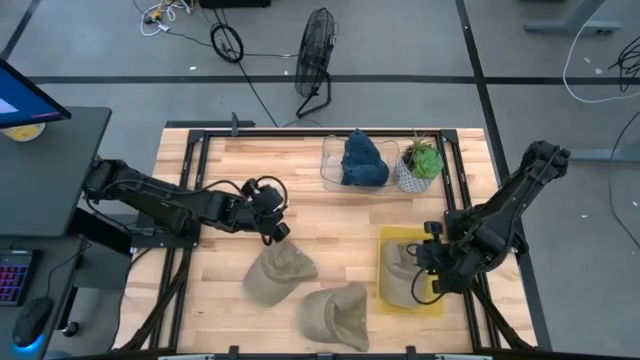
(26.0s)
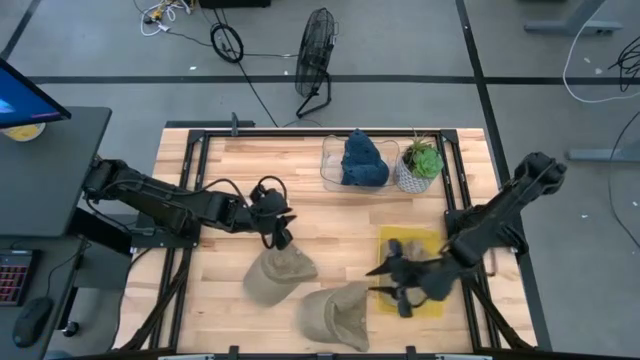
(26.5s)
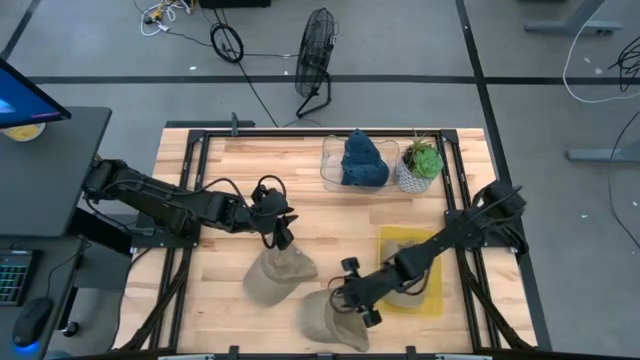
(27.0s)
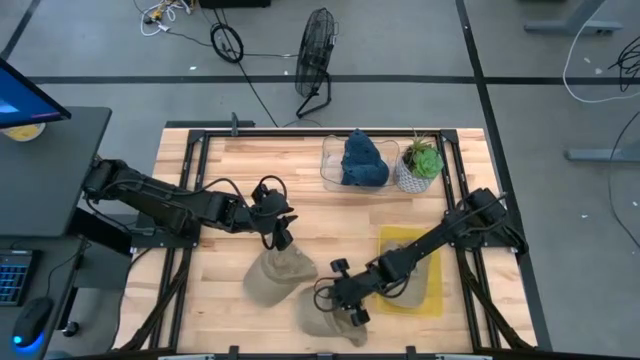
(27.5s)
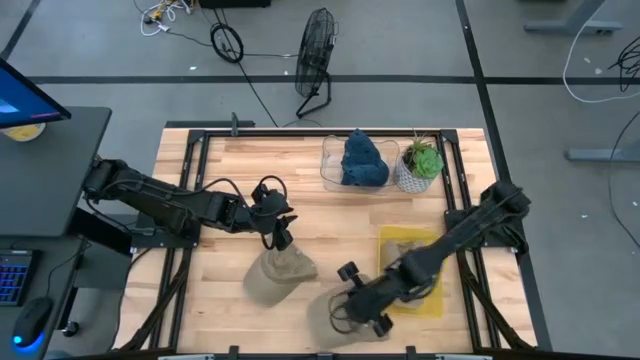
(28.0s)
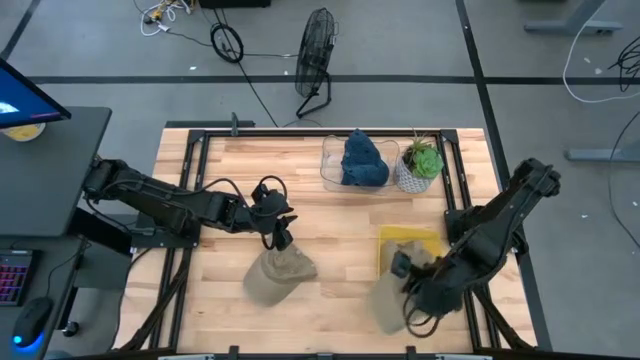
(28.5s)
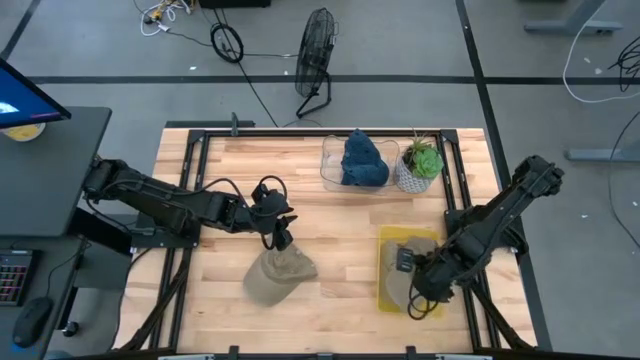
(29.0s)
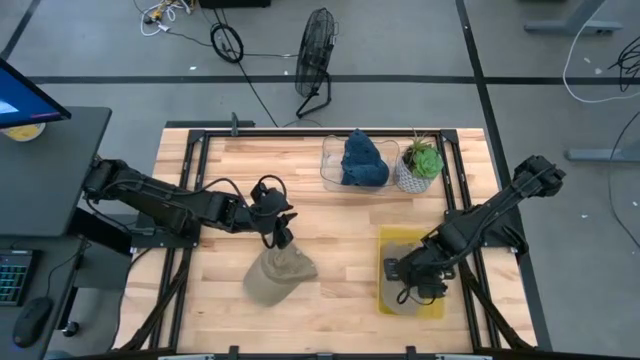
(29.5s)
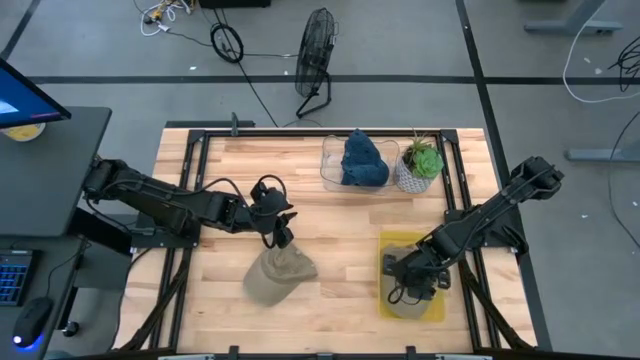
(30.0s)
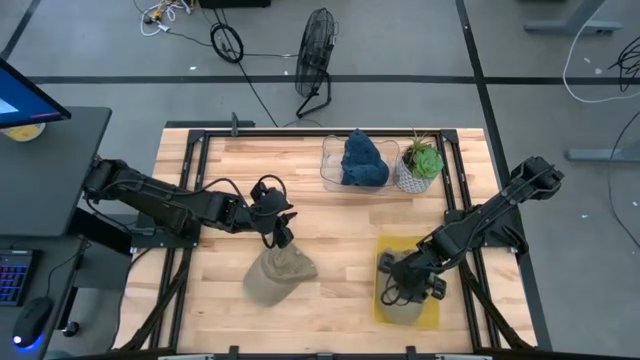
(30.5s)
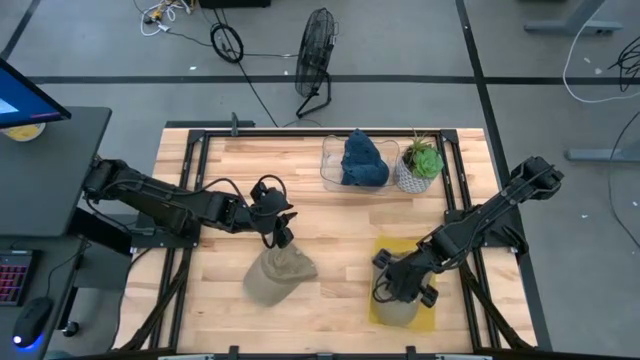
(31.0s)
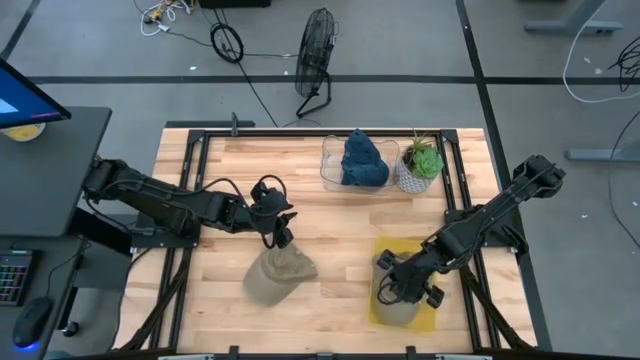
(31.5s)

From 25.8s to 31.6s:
Task: Pick & Place hat
Put the bottom brown cap into the yellow bin

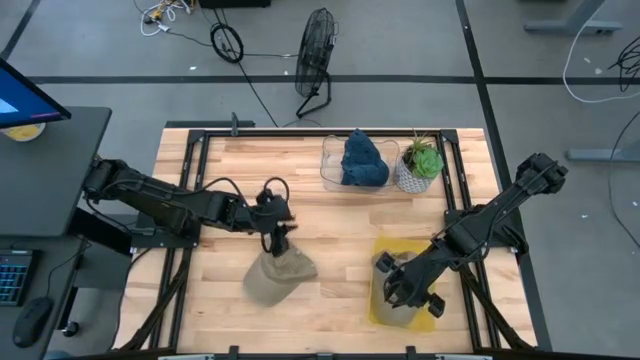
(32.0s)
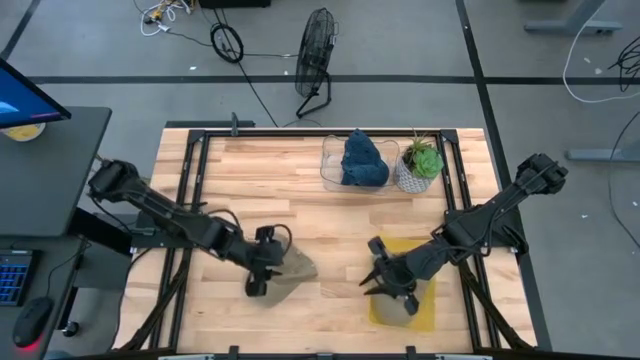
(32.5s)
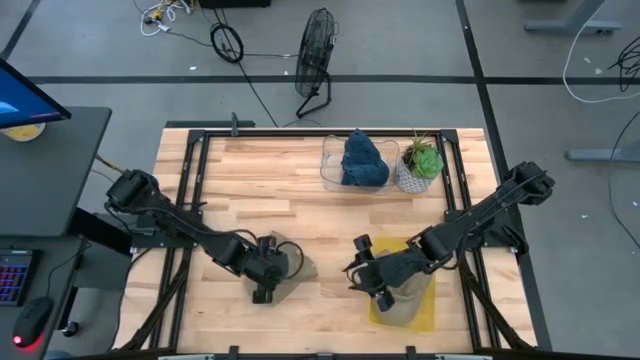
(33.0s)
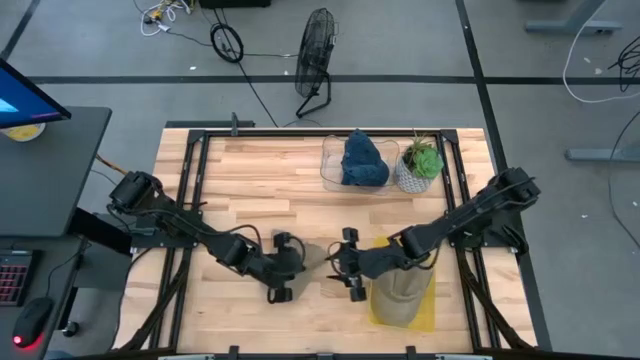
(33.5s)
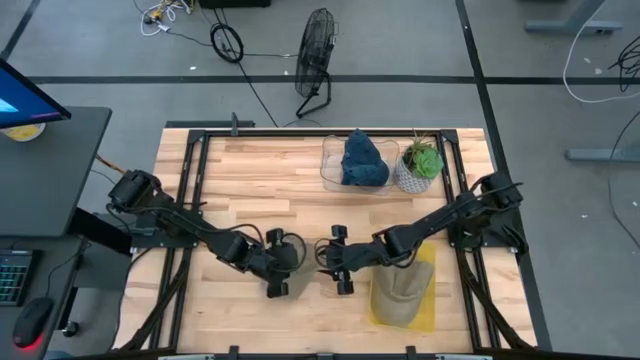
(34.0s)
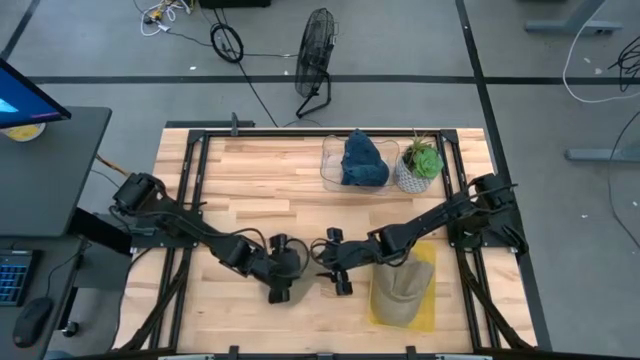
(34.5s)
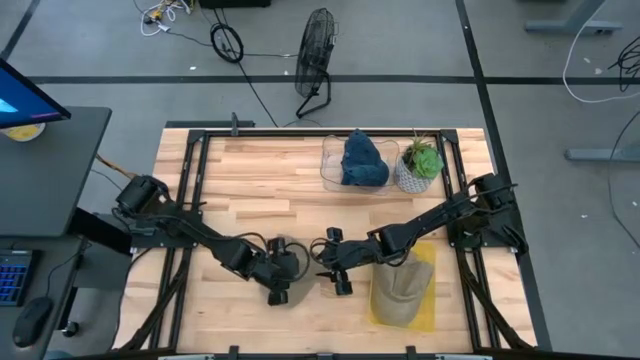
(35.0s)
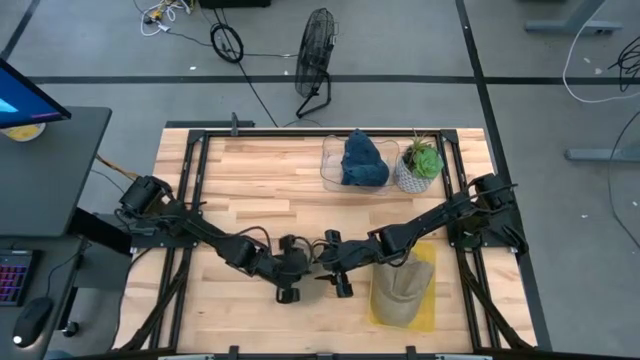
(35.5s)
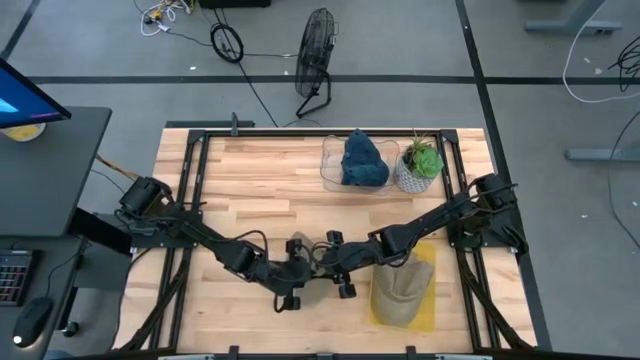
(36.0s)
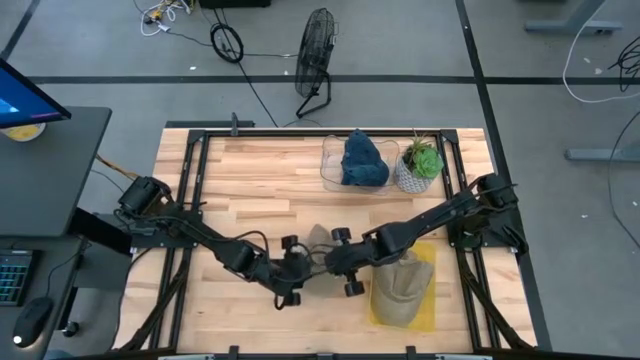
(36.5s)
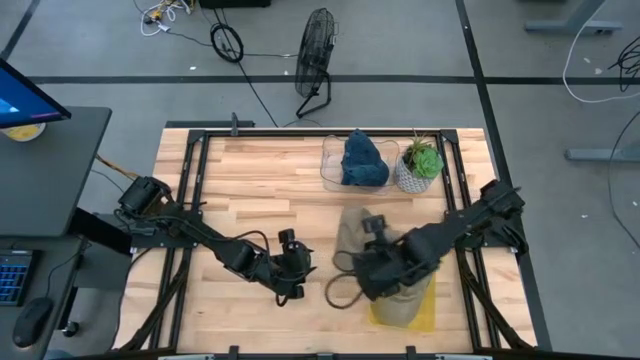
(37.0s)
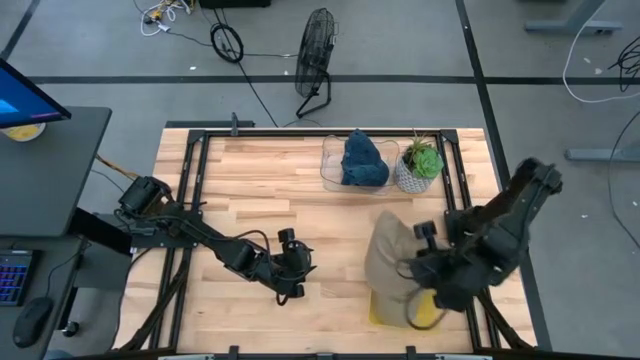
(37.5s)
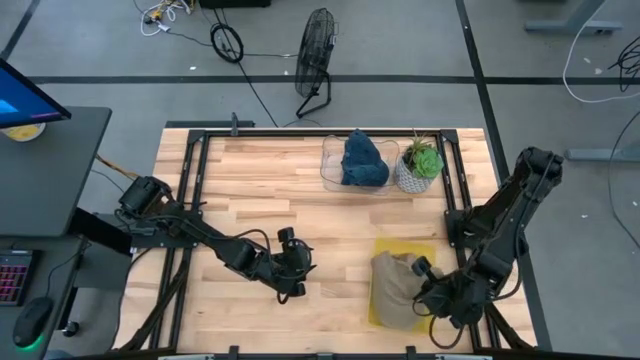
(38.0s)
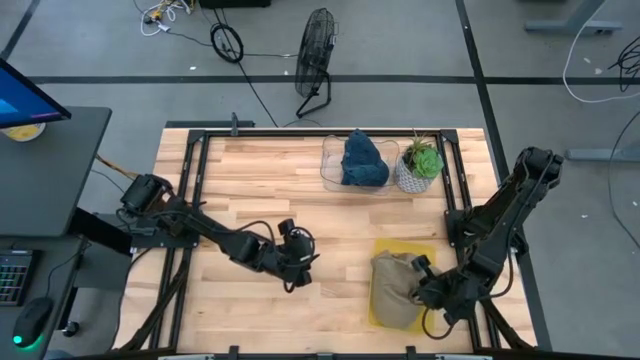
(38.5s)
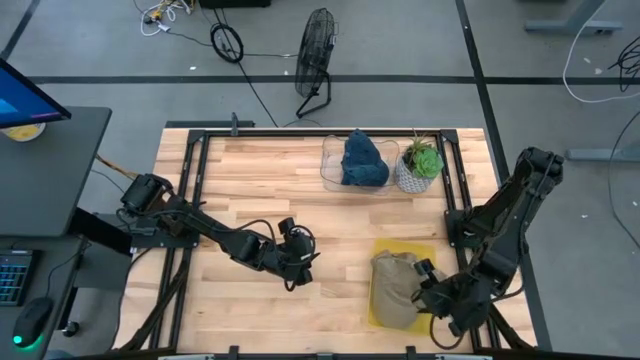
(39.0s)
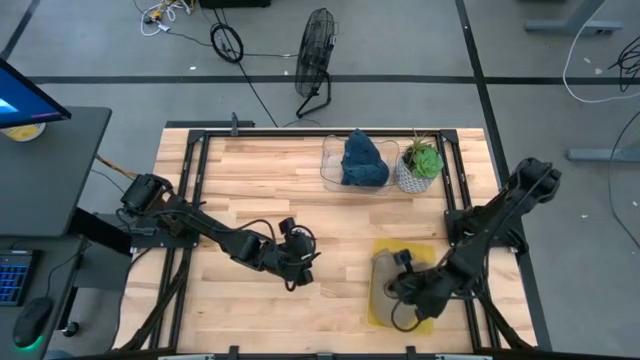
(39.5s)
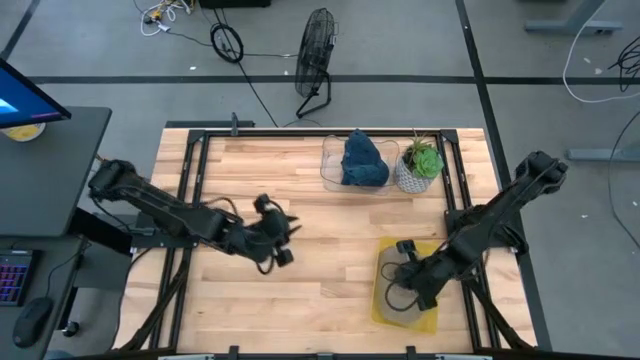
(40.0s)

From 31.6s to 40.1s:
Put the brown cap into the yellow bin

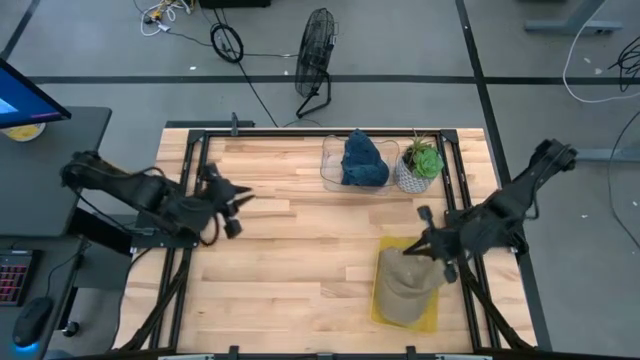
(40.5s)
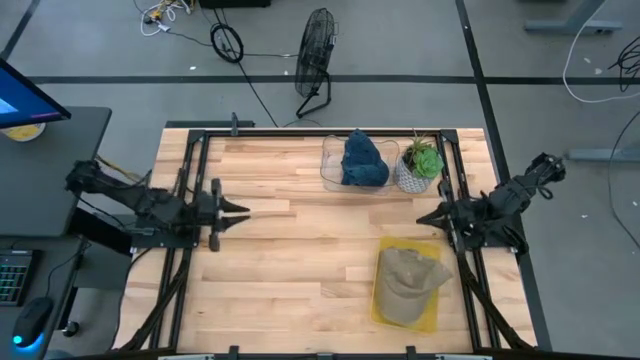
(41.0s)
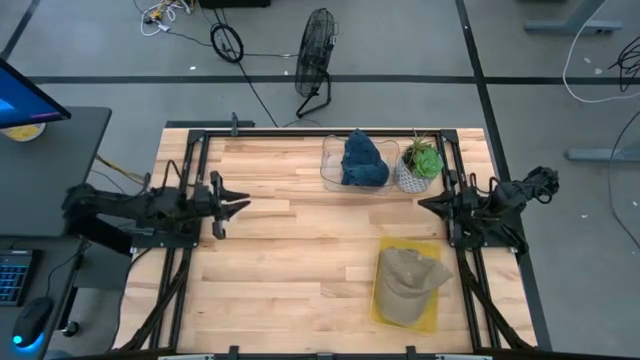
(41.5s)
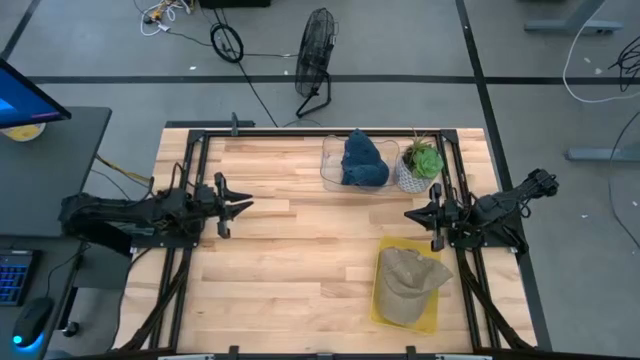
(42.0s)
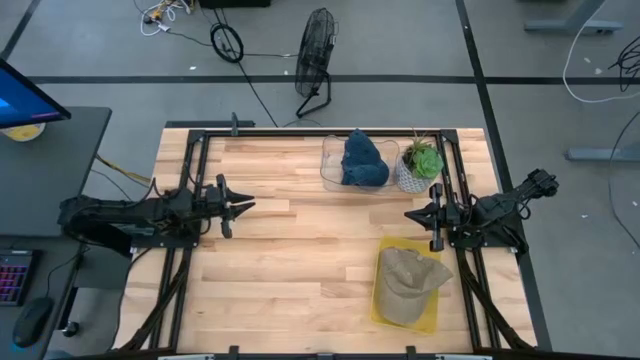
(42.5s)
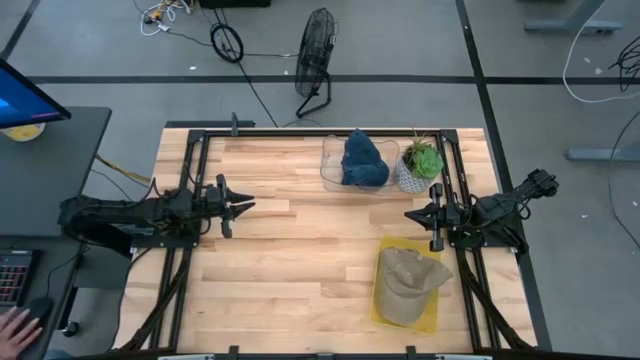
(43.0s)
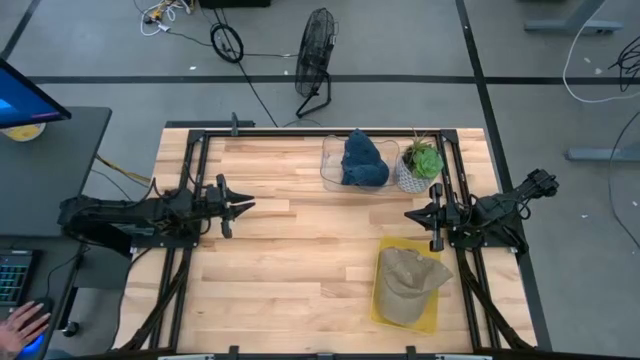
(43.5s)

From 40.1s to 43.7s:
Return to Home Position

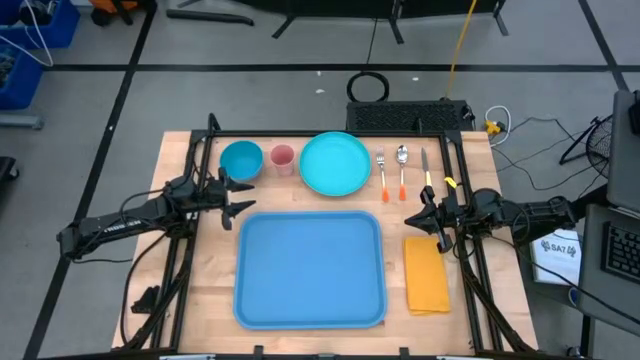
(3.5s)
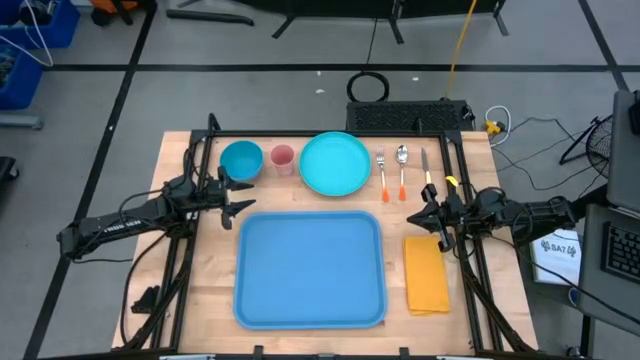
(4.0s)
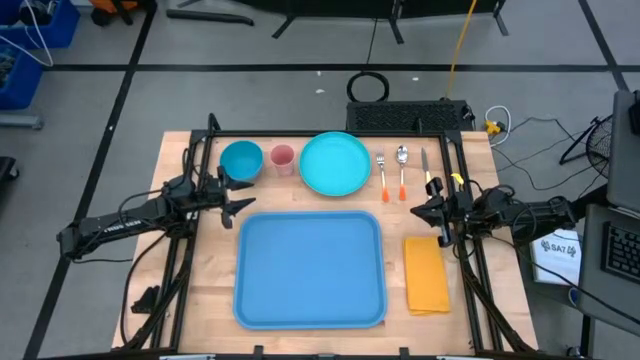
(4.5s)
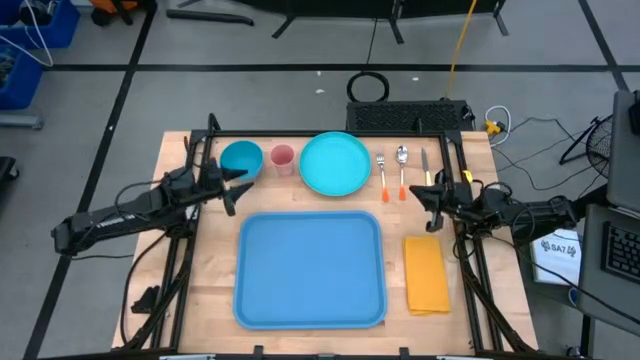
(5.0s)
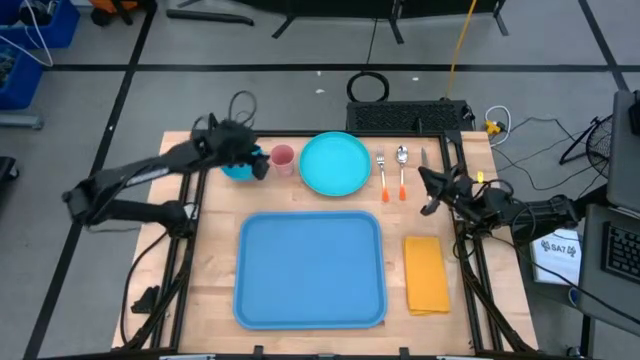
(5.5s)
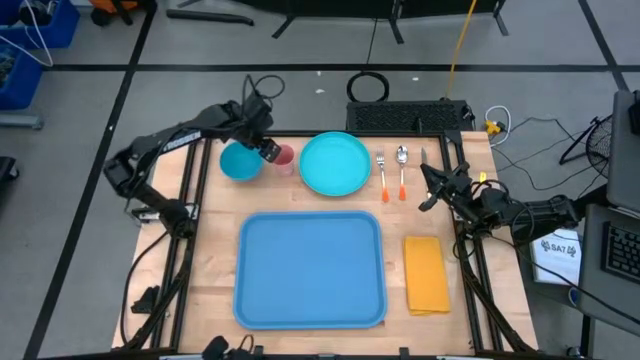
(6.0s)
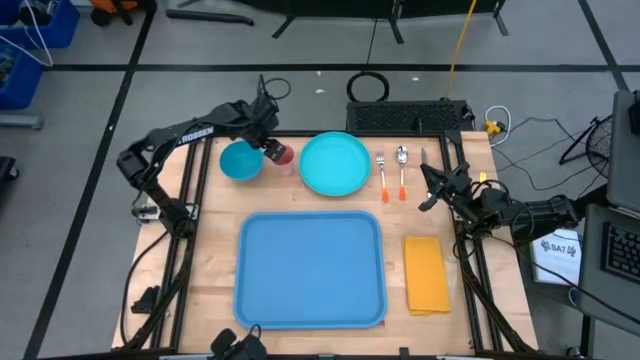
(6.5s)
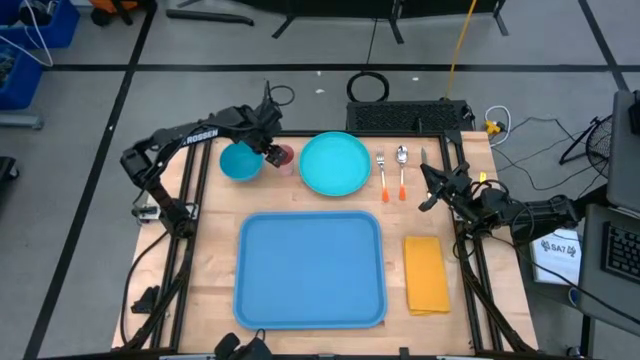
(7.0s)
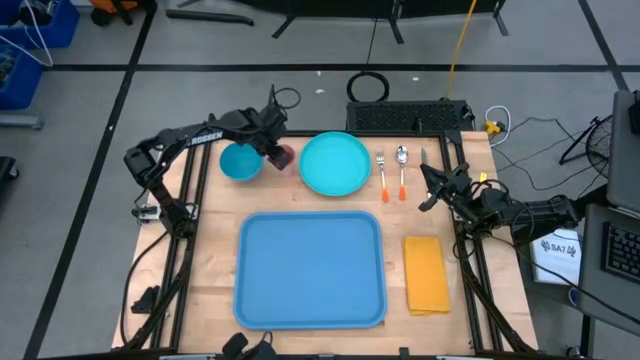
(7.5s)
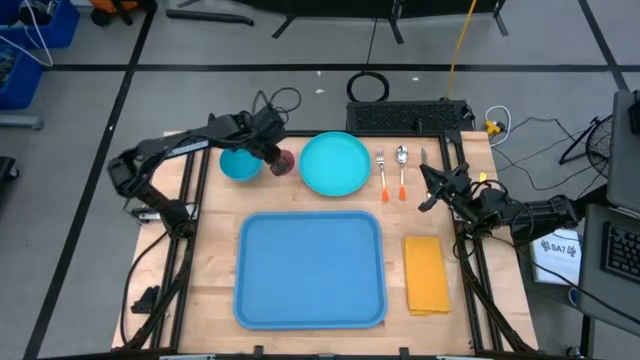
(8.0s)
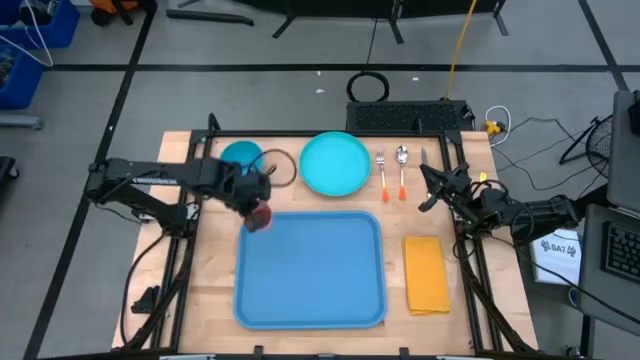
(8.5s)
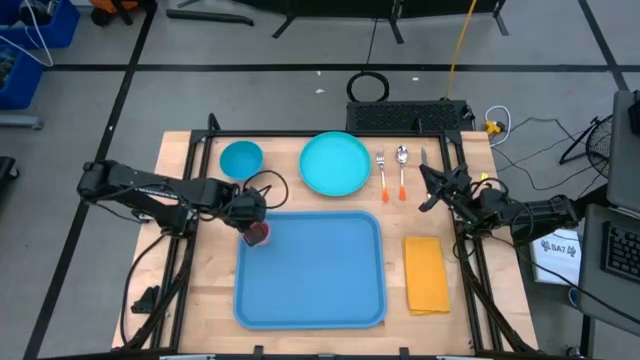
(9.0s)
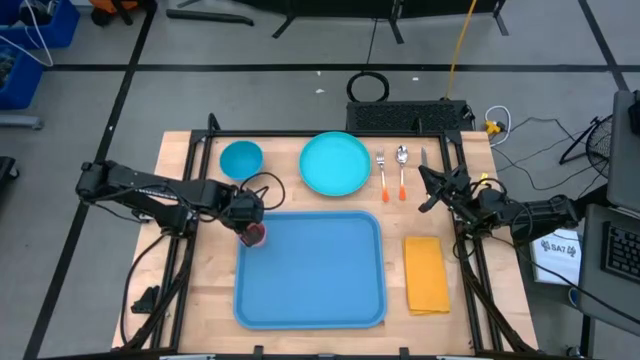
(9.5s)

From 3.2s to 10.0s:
Task: Set up tray
Put the pink cup to the top left on the blue serving tray
